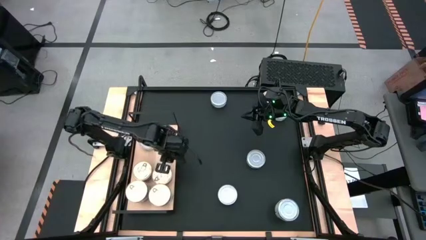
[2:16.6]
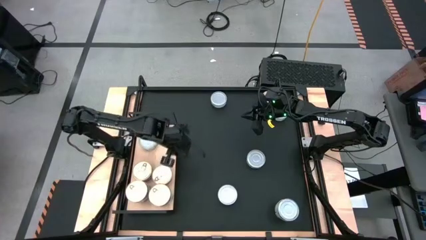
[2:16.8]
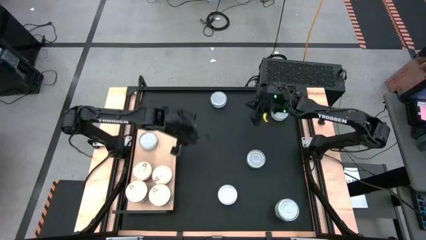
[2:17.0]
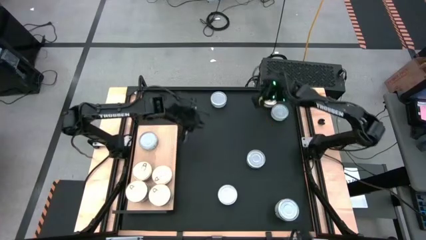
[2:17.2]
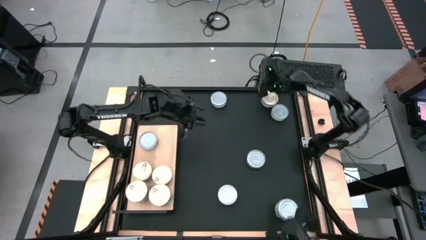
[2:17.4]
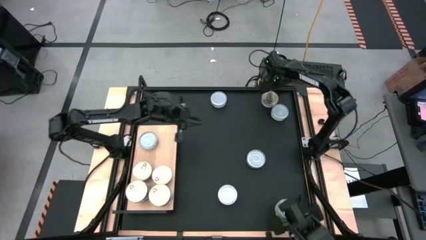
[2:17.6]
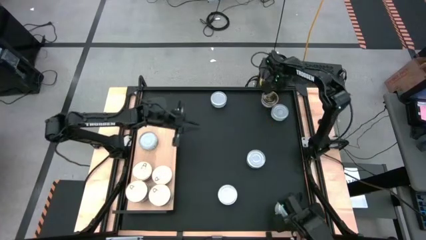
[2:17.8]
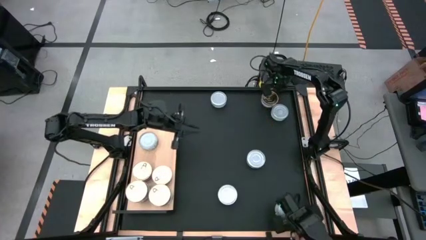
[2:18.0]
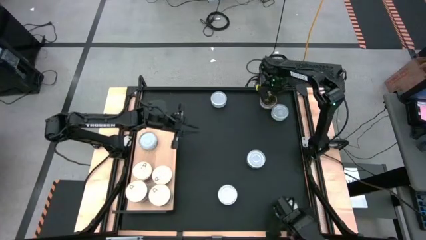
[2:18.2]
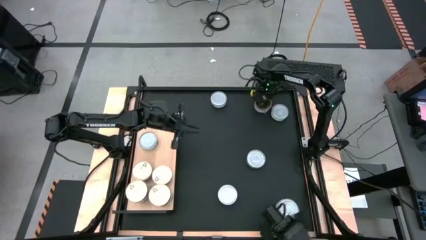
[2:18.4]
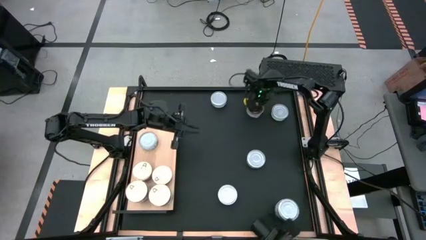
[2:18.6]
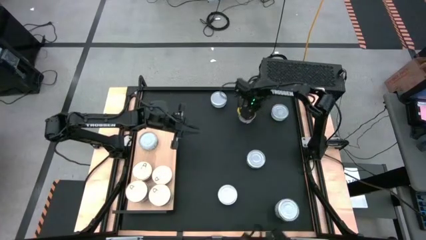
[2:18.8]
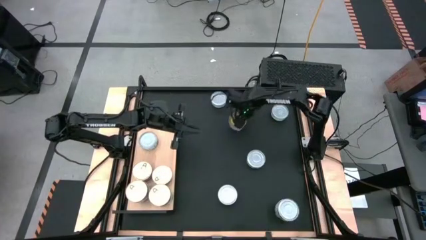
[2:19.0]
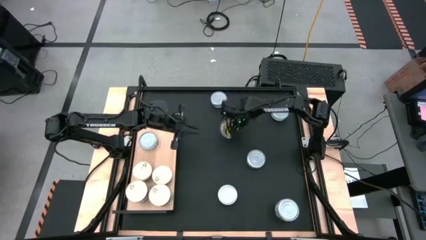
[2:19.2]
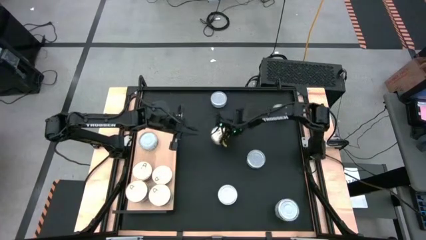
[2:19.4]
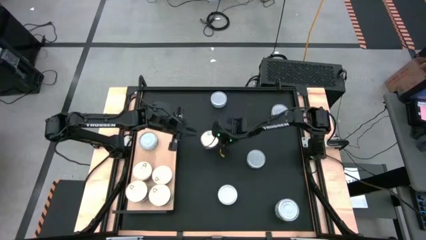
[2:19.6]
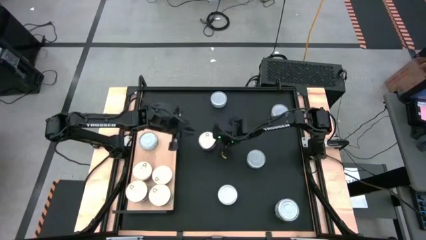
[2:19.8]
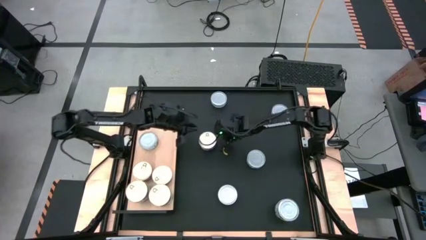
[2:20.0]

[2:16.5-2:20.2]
Task: Stack canned seafood by type on shelf
Move the blue tuna can to the center of the table

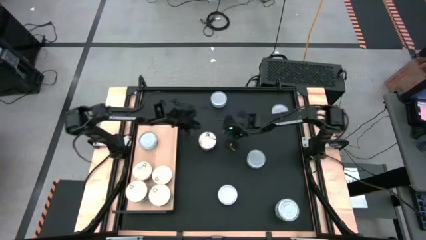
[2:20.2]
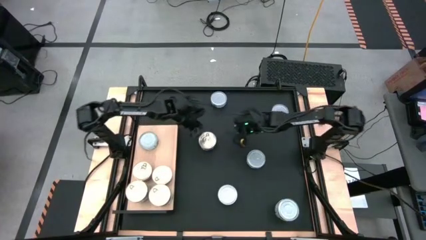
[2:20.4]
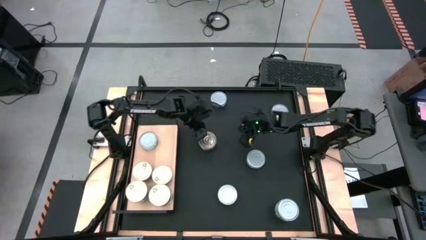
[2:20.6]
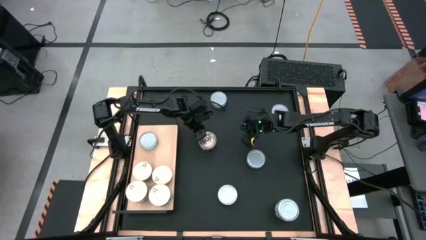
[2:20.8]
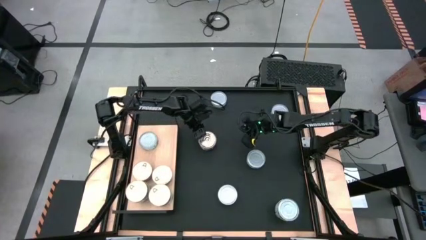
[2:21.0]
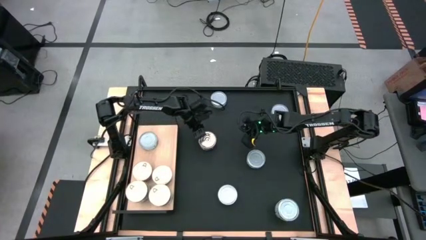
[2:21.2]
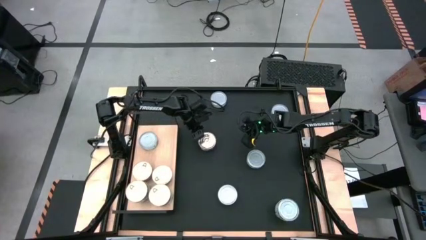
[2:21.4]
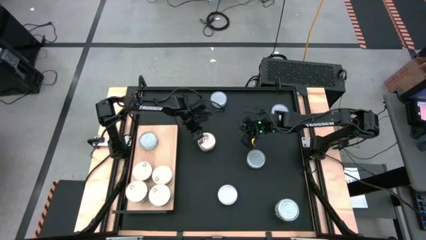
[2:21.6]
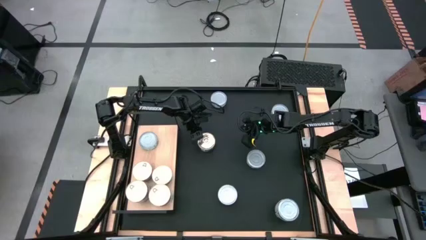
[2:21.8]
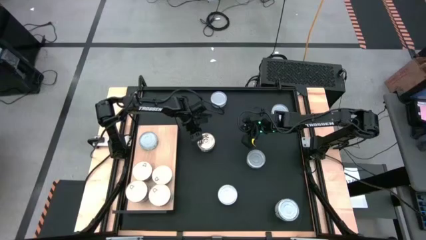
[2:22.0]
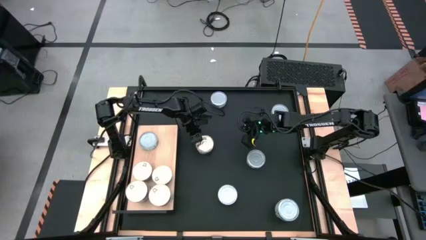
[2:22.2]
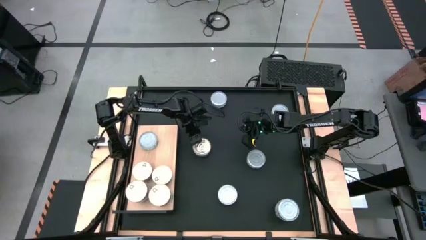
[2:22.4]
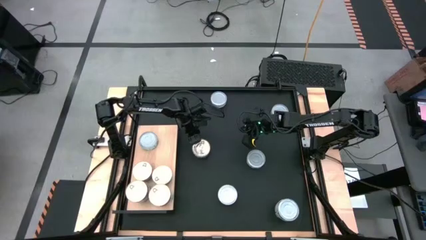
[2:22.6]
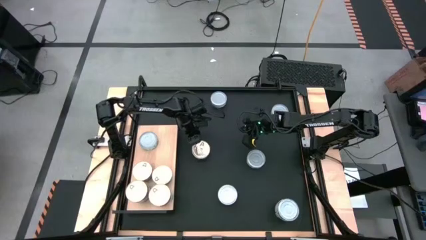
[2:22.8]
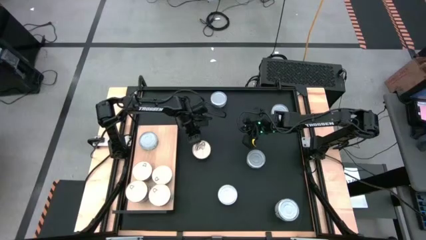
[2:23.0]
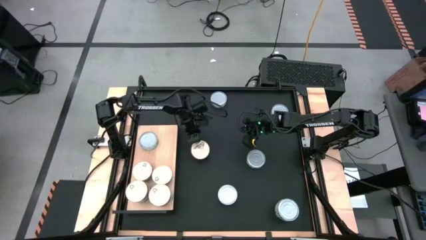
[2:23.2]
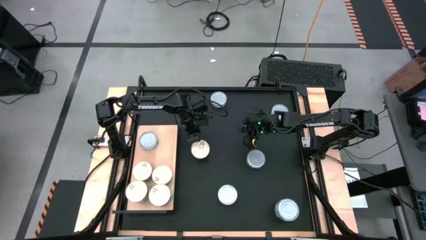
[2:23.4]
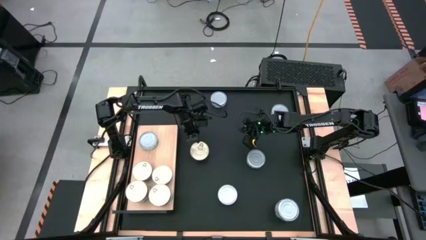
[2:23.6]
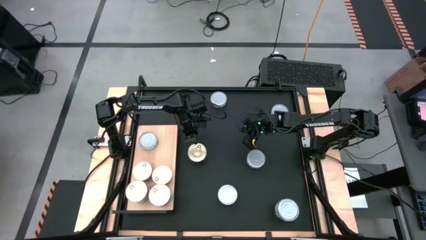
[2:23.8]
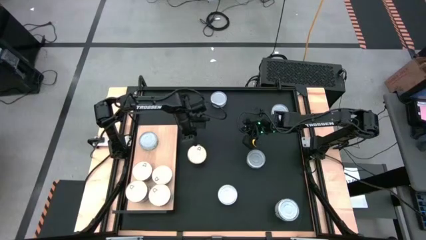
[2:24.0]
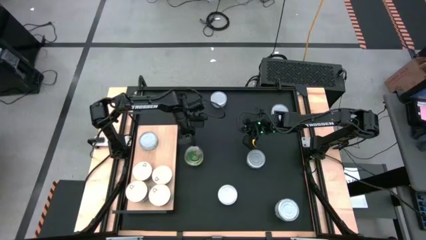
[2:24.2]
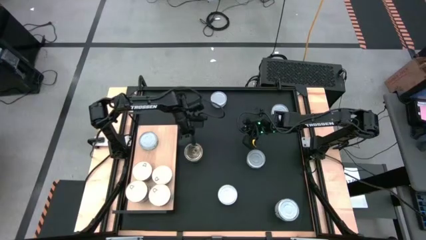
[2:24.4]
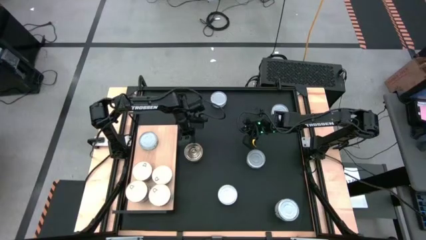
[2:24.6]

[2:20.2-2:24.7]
Stack the blue tuna can on top of the blue tuna can on the shelf

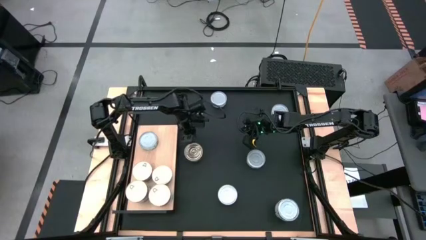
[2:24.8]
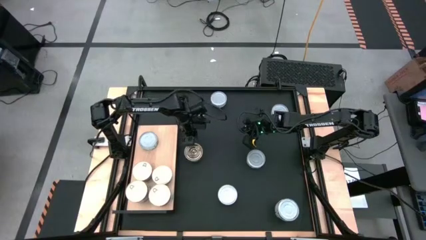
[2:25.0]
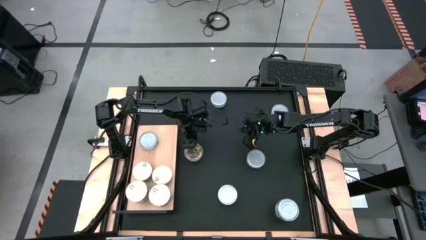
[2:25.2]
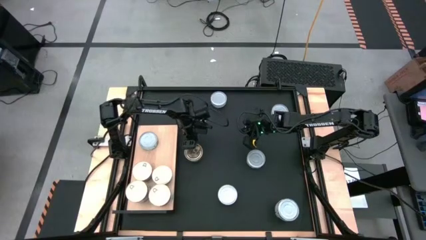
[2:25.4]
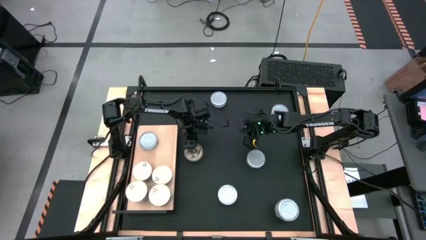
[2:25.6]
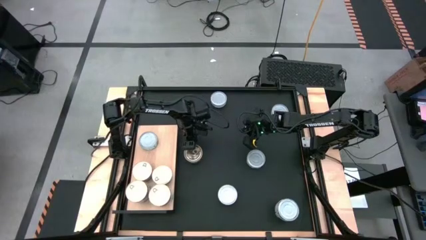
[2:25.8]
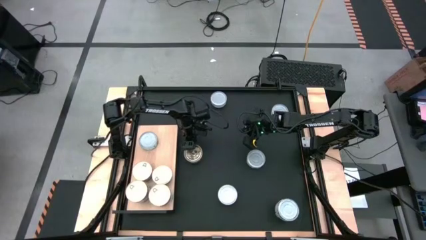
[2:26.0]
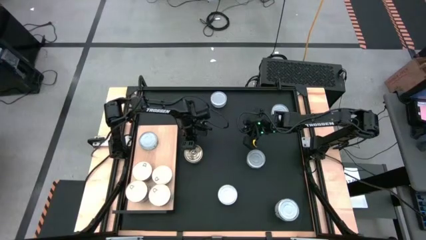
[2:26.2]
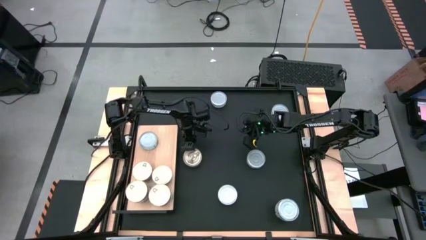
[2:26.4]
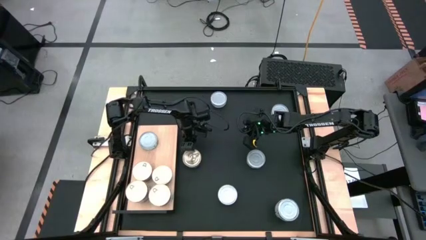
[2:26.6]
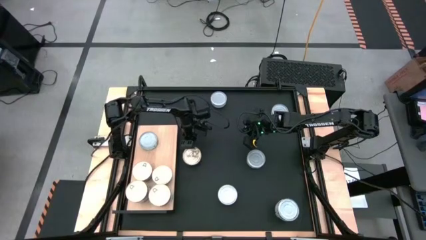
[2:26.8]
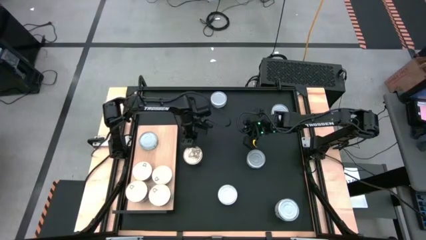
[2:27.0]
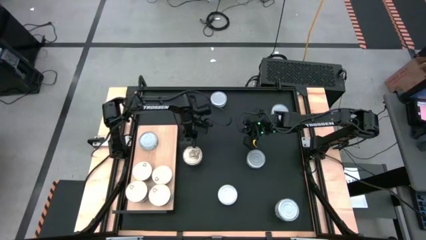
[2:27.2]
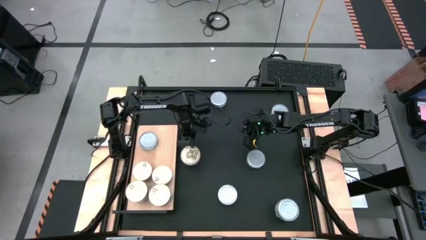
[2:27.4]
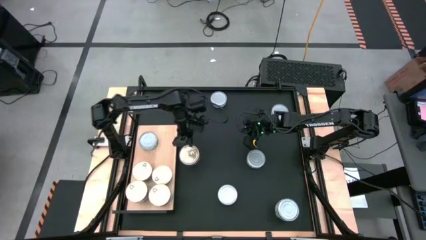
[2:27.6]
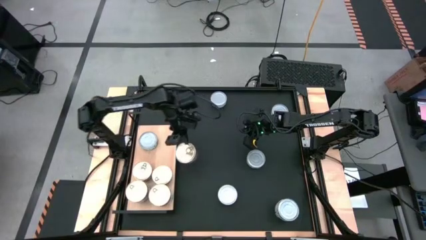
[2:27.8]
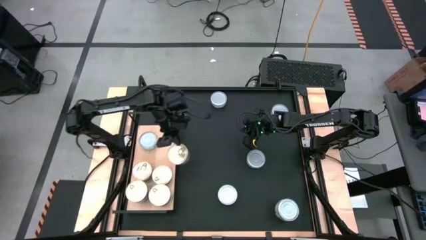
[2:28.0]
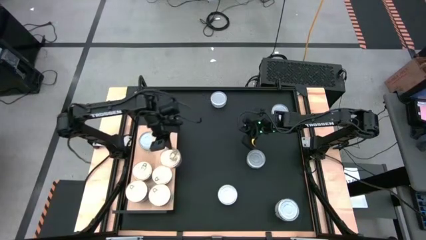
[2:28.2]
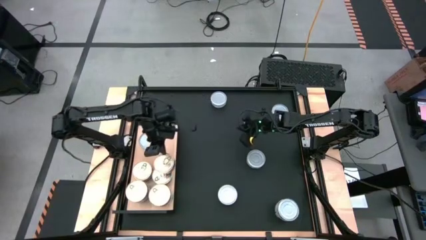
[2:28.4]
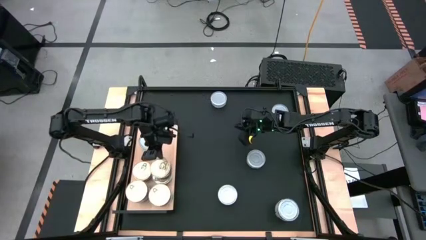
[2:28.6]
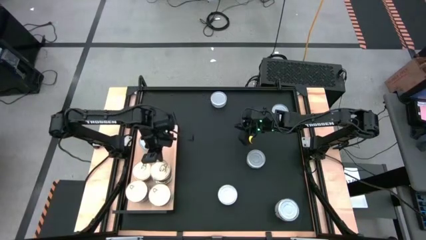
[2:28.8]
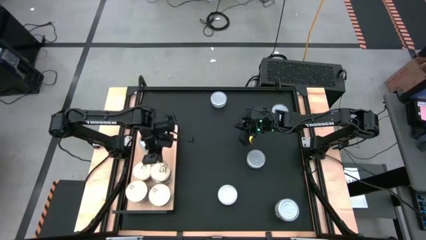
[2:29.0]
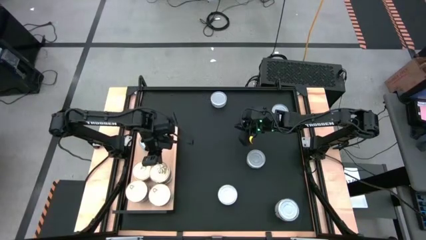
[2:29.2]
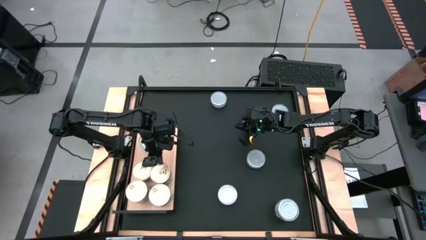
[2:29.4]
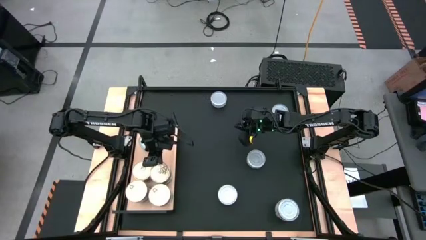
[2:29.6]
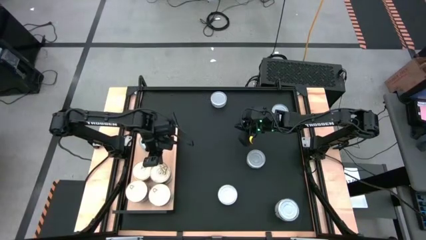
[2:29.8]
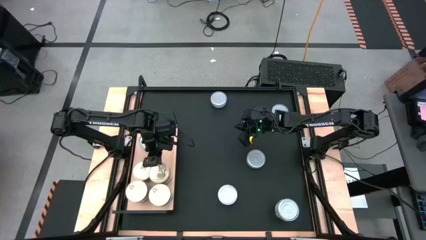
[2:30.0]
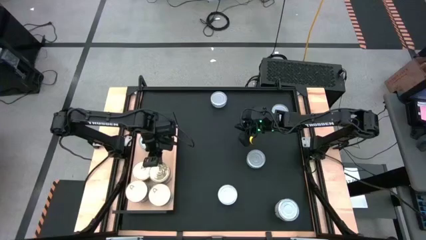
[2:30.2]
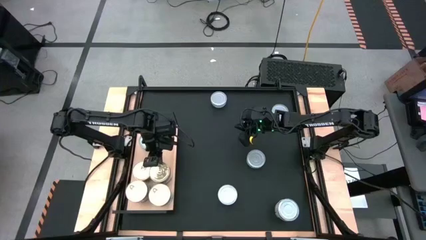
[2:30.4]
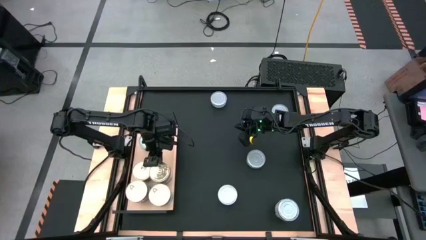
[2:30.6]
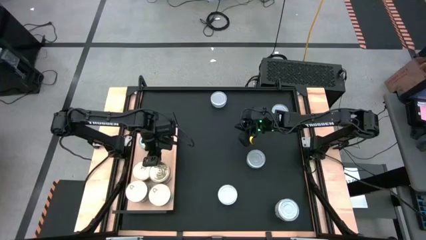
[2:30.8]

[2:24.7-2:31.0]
Stack the blue tuna can on top of the blue tuna can on the shelf

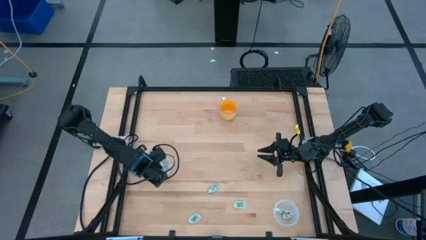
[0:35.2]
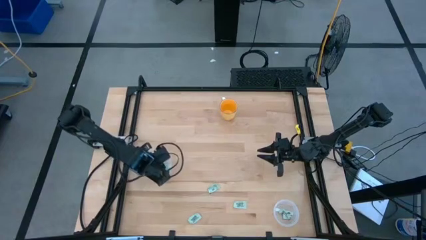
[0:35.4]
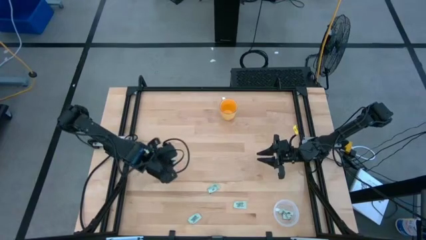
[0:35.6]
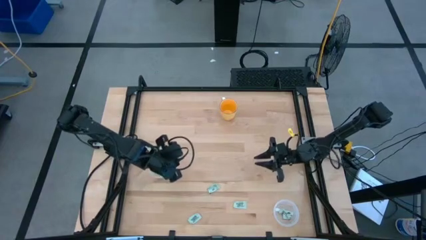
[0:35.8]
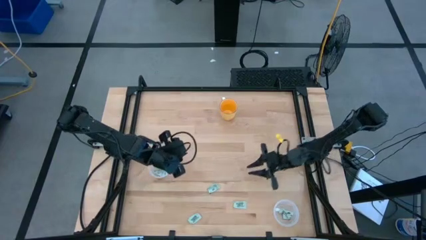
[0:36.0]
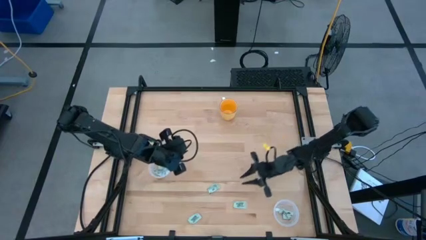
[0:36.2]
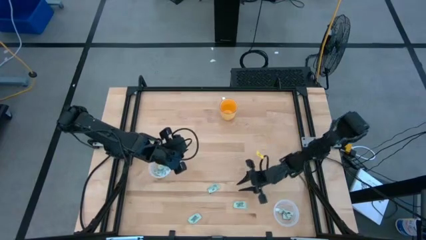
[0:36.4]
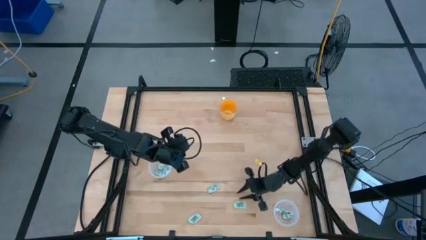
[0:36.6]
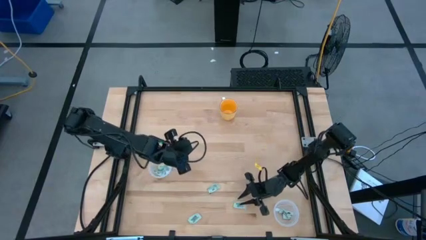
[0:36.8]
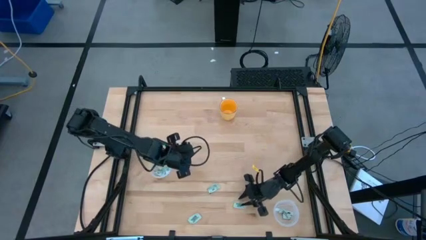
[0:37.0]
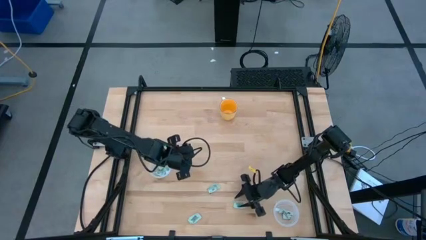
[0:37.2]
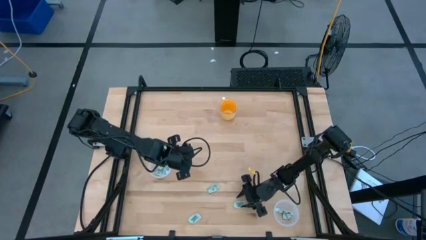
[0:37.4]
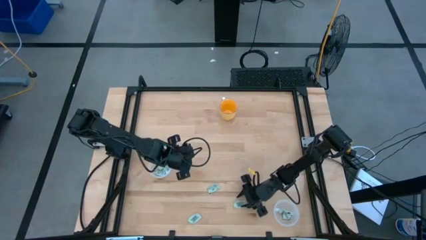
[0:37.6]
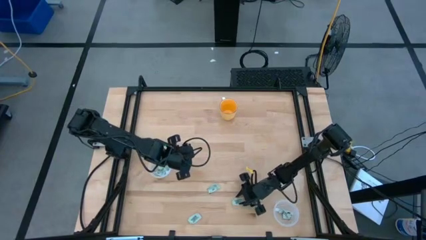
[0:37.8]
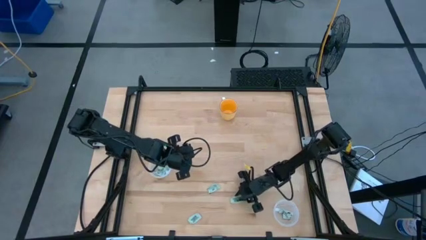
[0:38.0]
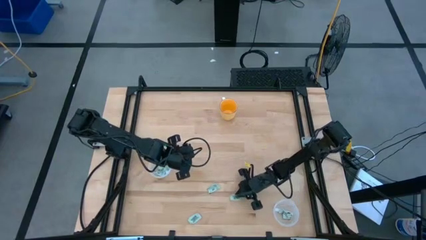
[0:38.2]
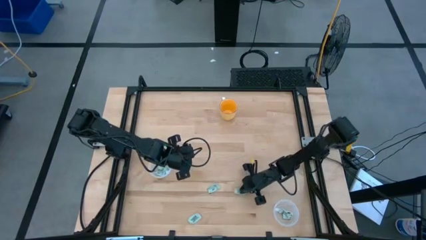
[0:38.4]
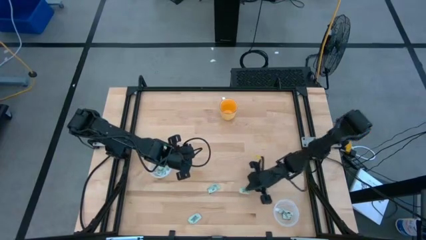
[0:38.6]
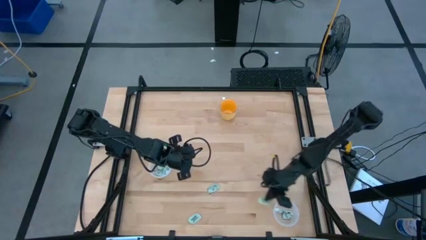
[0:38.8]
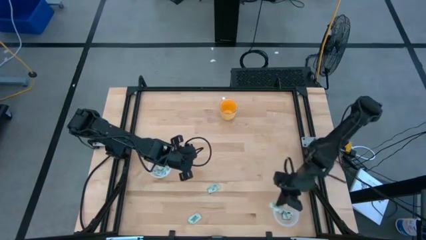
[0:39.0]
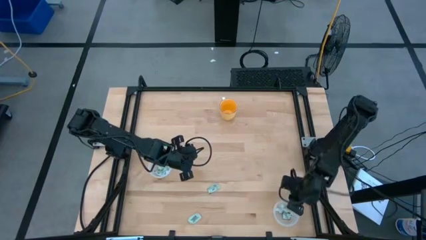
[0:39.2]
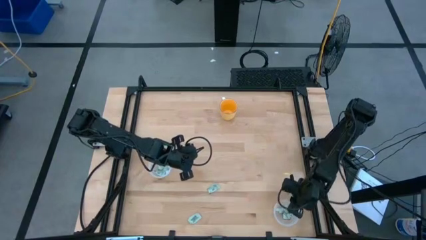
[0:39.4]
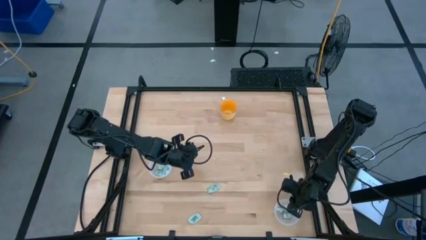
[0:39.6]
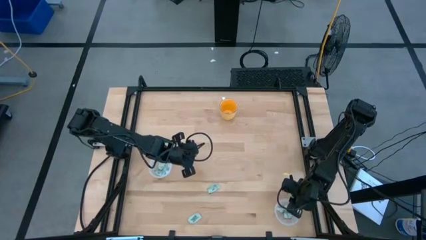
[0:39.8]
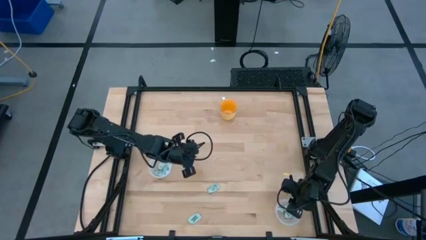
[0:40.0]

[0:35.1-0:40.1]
Task: Pick and place Stevia / Truvia into bins
Put the right light green stevia packet into the right transparent container
